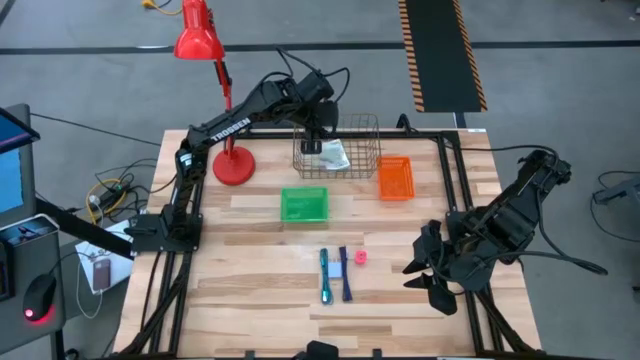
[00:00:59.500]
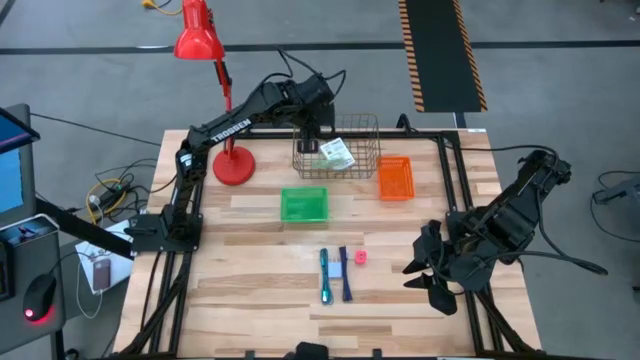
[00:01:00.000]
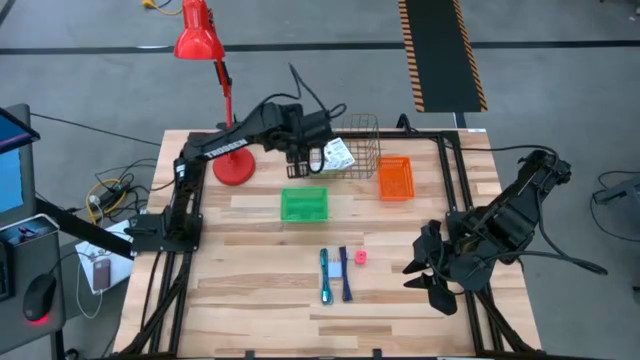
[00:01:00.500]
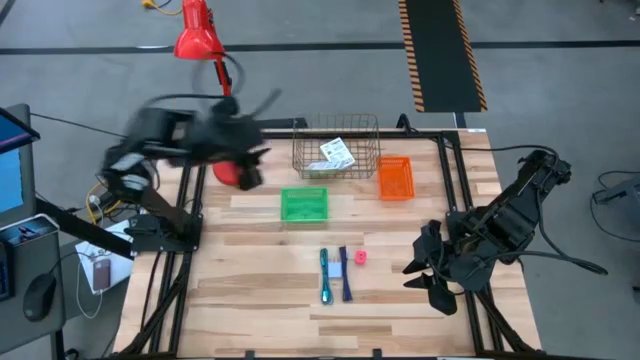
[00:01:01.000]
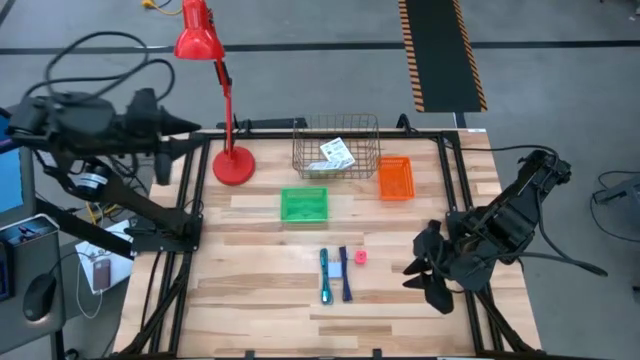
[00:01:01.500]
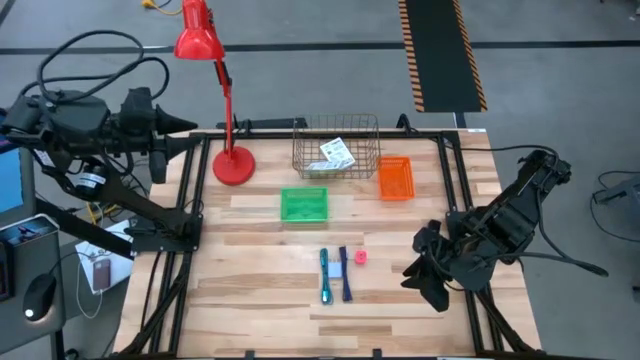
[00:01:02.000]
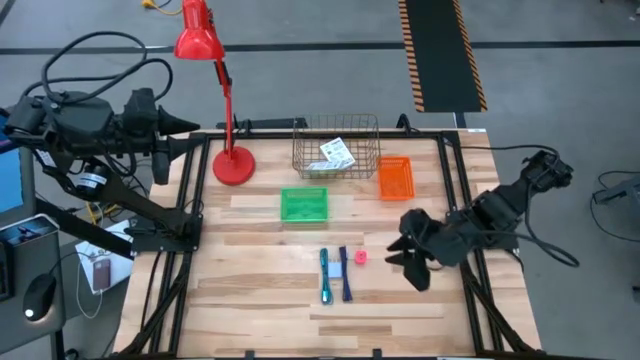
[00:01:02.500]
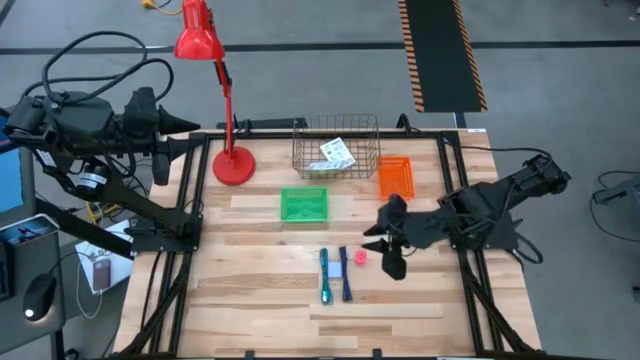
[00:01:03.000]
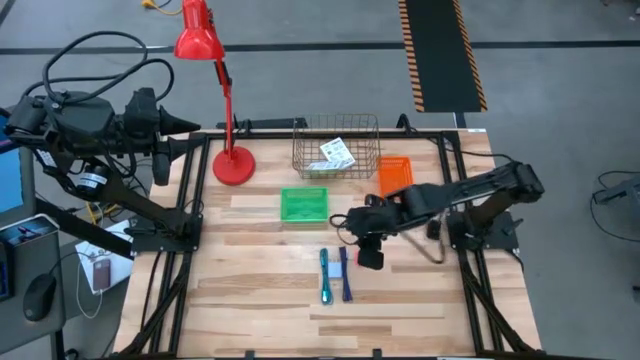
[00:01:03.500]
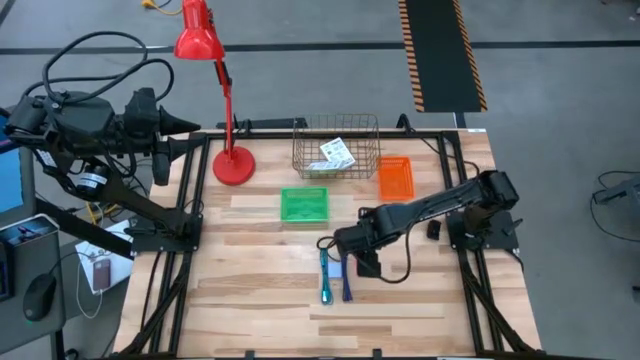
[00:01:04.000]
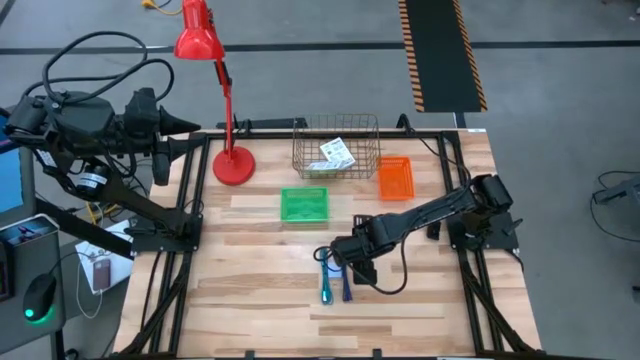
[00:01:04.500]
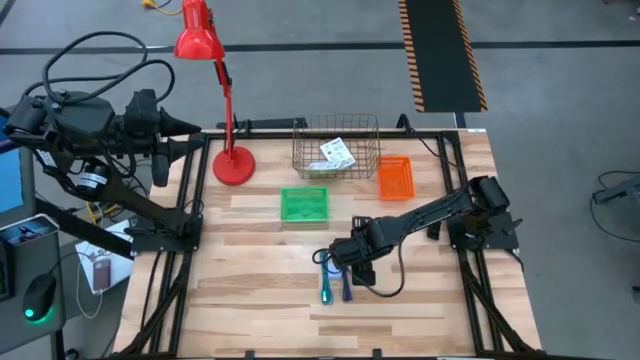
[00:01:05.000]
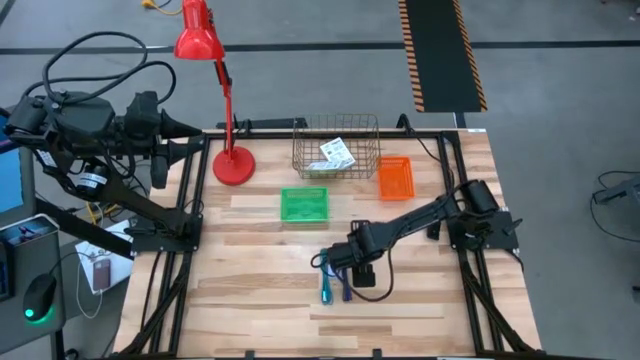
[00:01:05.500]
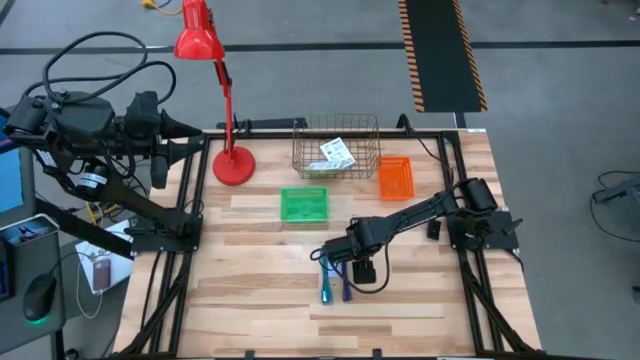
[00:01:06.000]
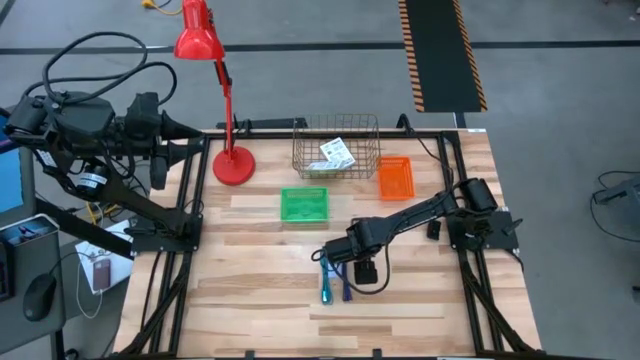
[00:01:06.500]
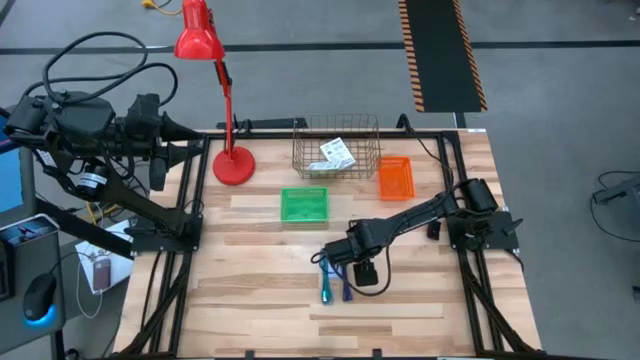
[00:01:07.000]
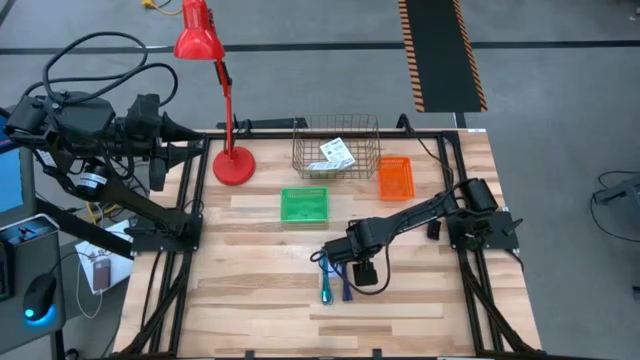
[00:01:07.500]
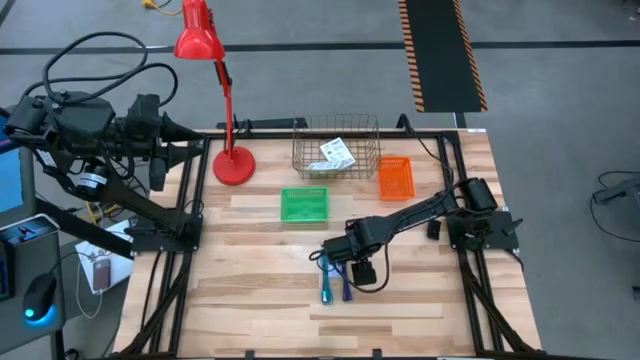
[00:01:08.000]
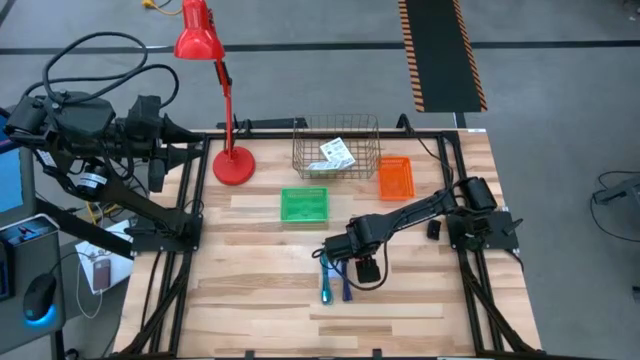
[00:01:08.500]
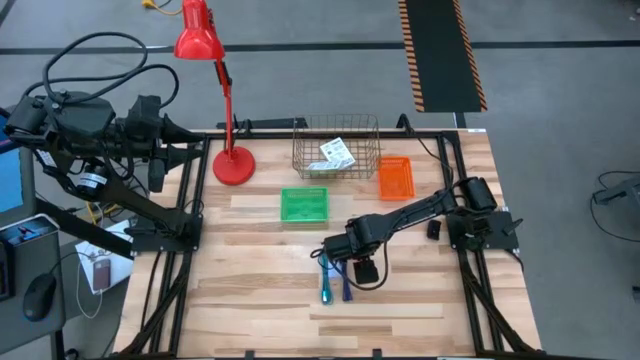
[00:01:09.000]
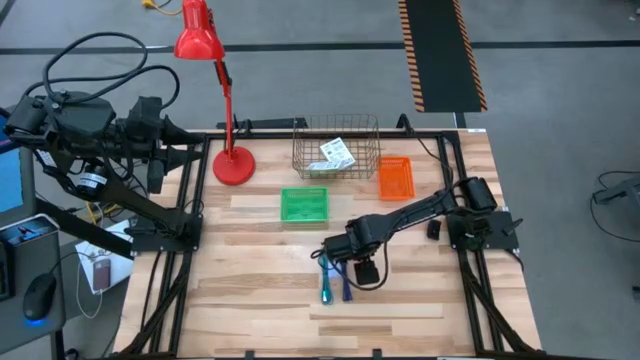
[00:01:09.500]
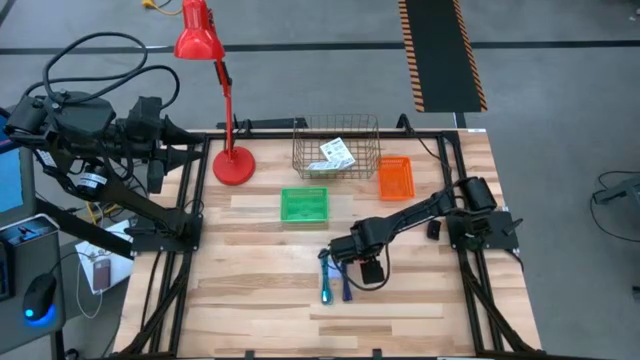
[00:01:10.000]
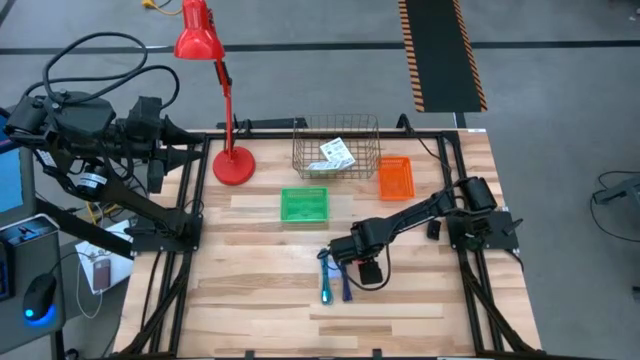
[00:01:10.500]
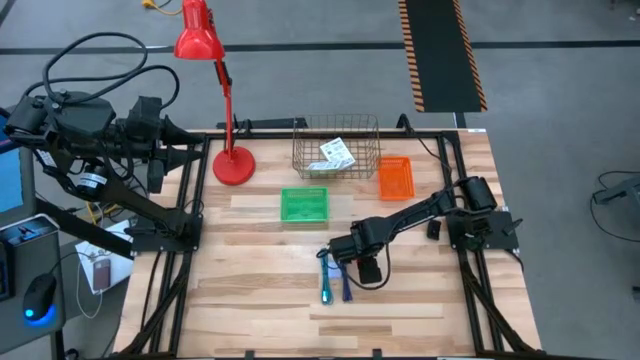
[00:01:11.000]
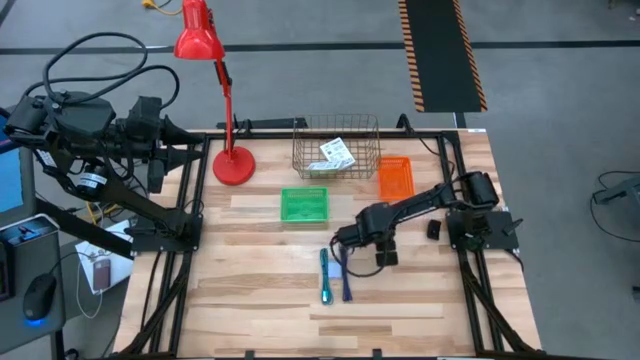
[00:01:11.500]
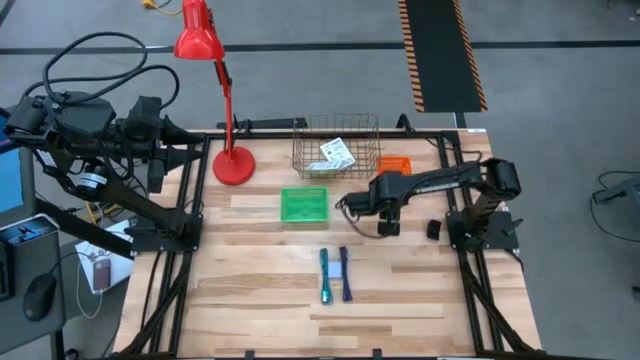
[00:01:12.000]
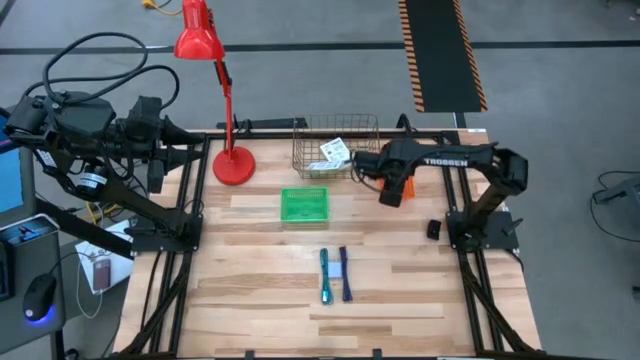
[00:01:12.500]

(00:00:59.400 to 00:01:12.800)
Task: Pick and place items into bin
Put the pink charger adapter into the orange bin

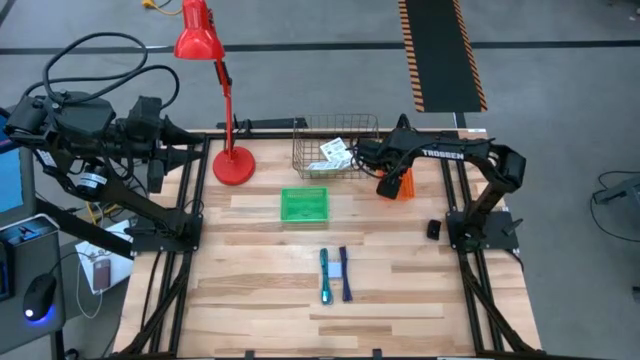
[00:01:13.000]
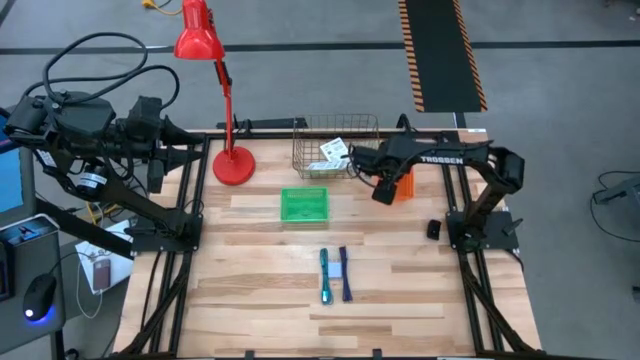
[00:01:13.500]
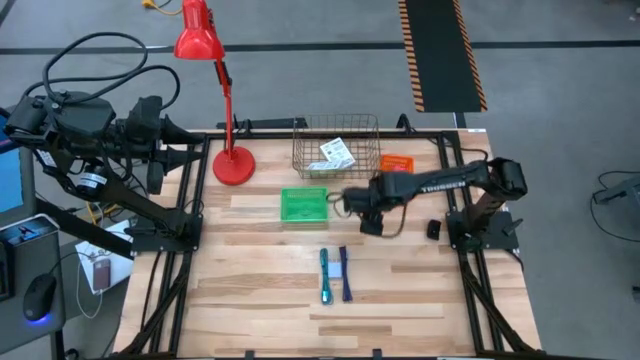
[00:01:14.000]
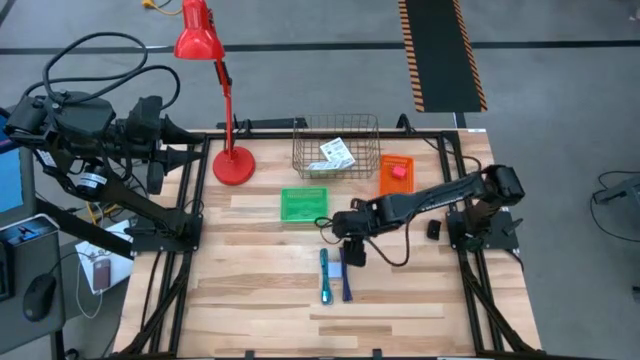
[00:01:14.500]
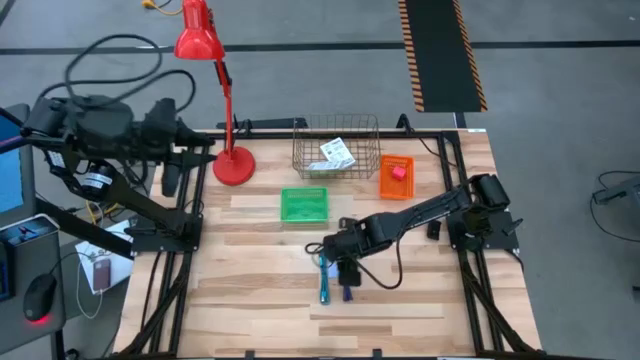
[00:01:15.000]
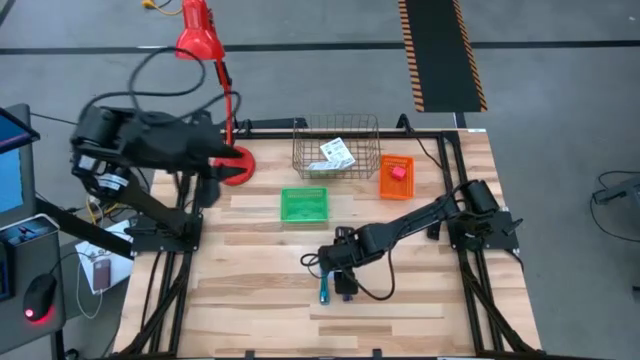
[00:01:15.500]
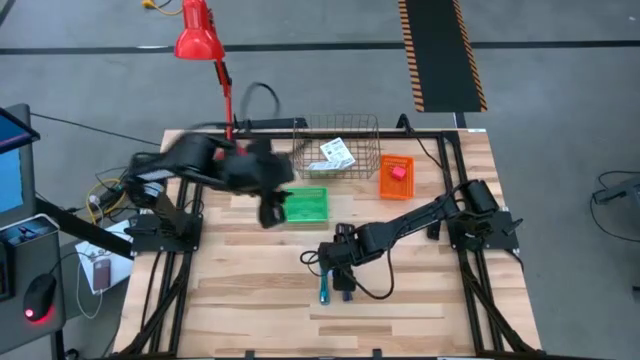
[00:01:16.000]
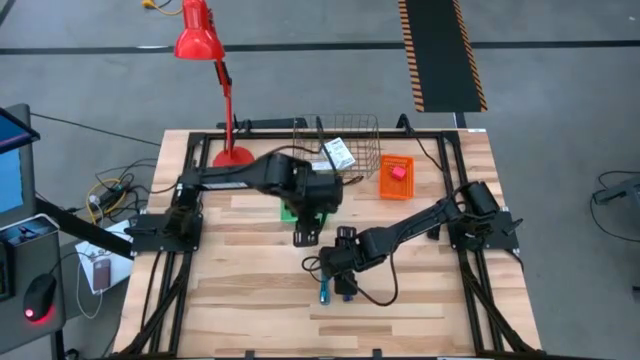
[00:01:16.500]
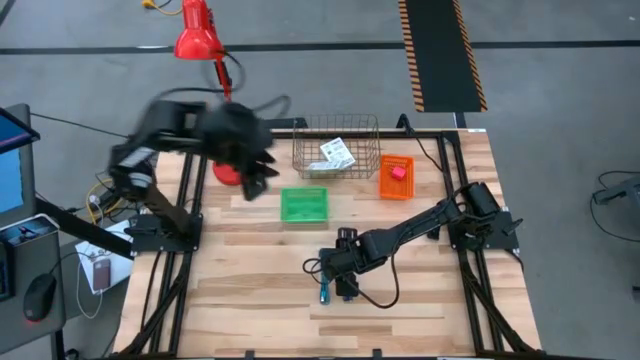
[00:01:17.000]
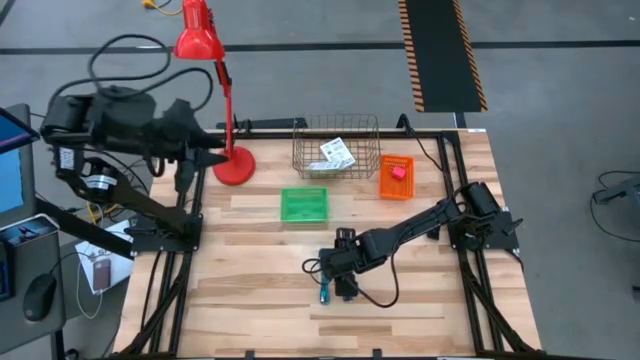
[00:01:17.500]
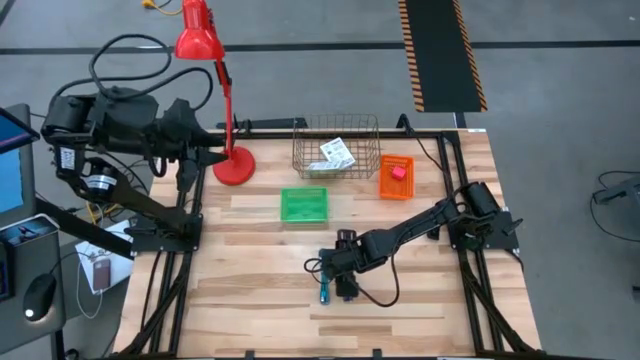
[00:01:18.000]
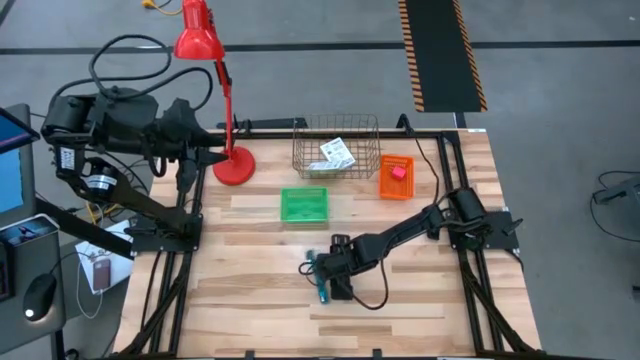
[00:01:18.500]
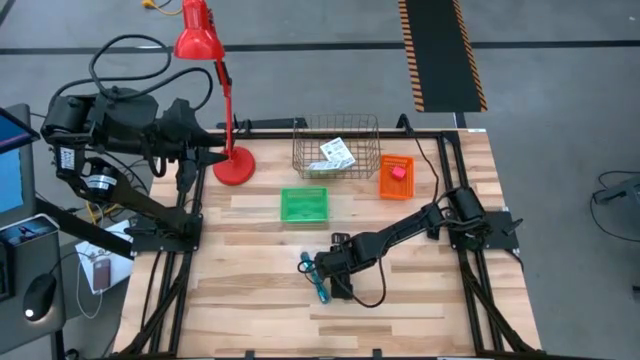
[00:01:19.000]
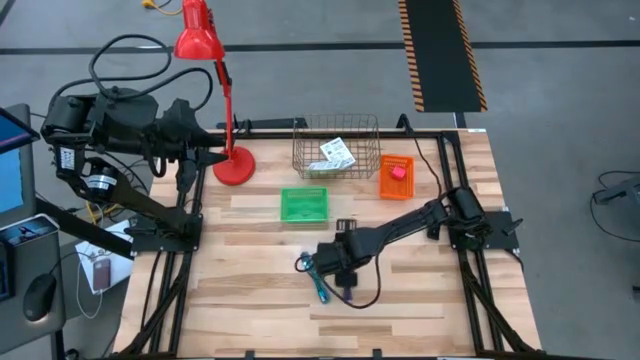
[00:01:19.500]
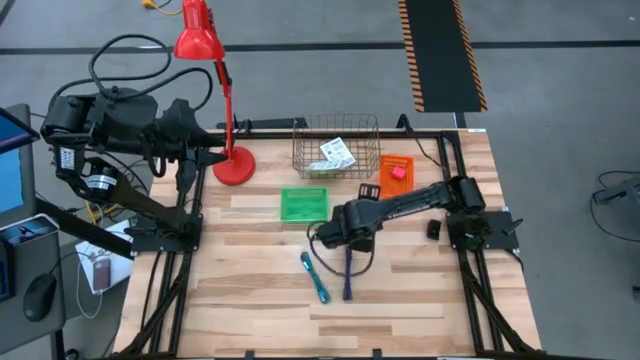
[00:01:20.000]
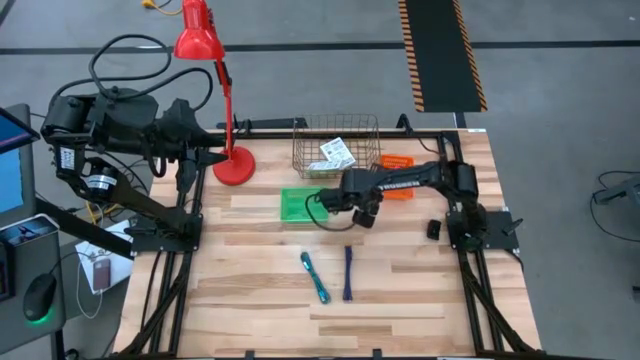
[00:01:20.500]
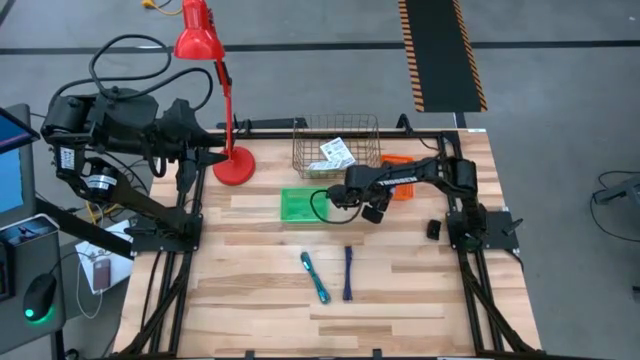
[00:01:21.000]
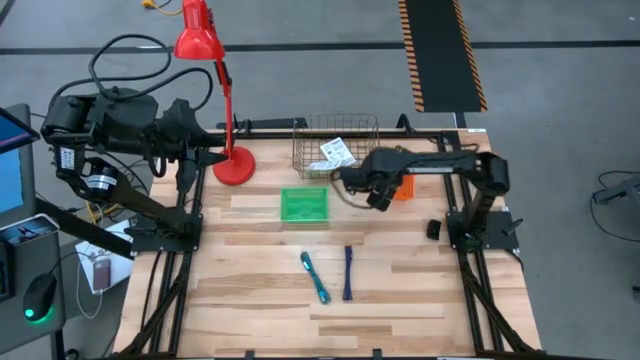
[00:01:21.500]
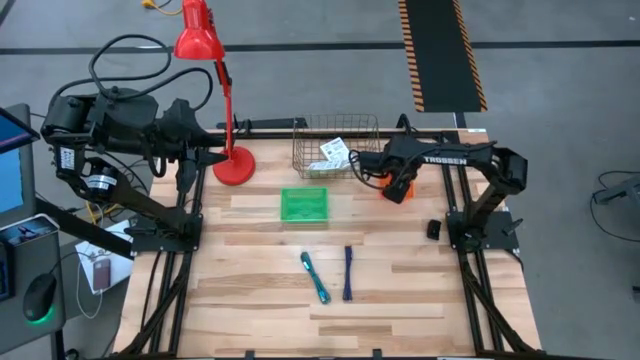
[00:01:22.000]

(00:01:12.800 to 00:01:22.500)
Put the white charger adapter into the orange bin
